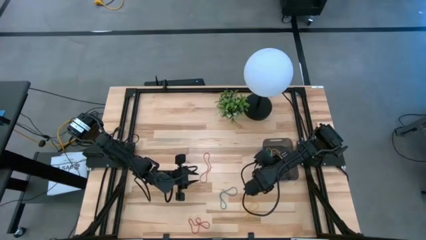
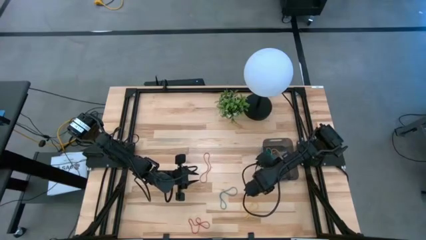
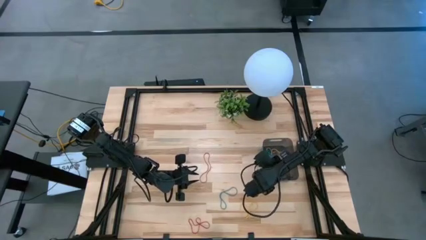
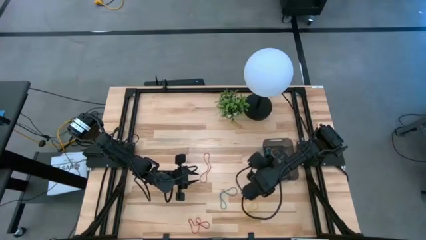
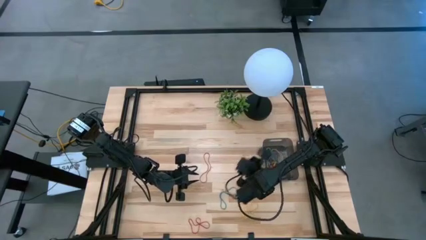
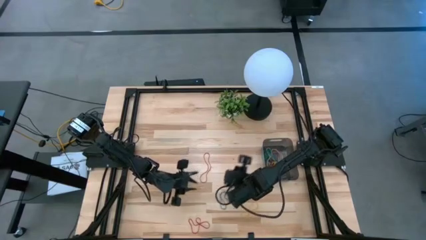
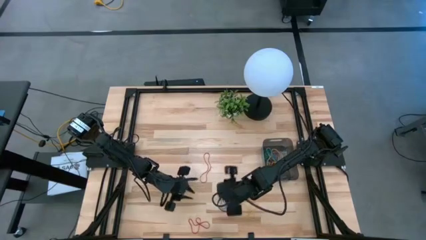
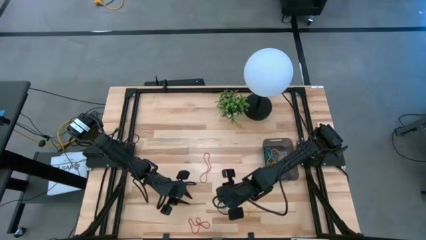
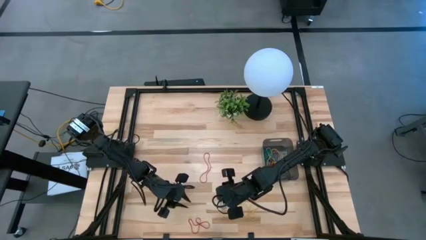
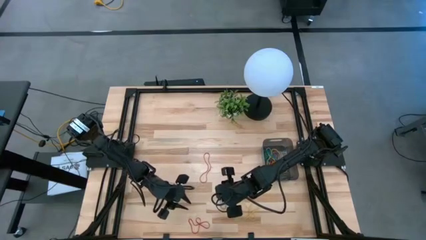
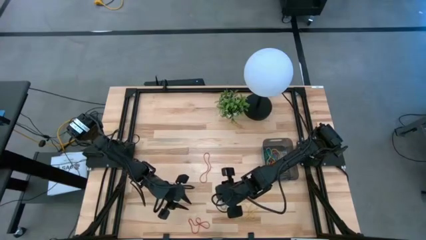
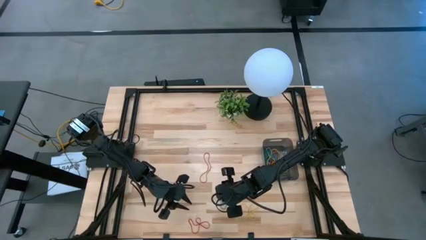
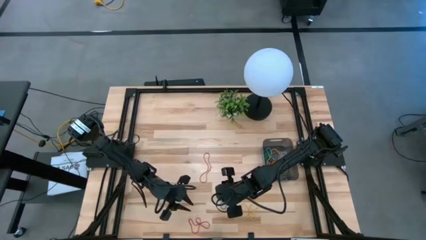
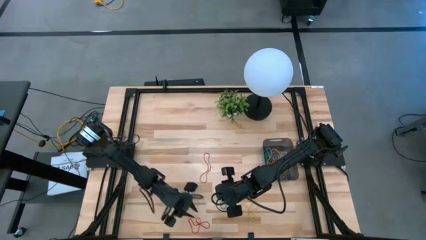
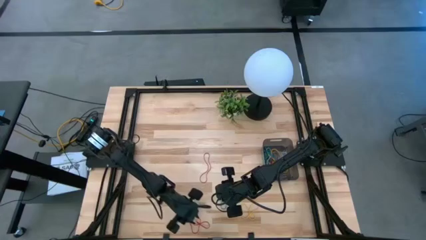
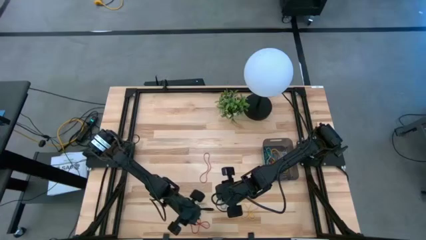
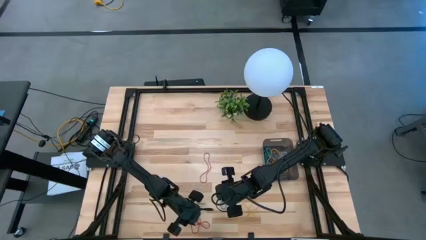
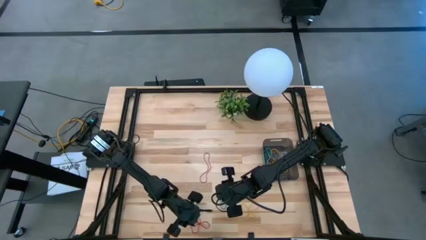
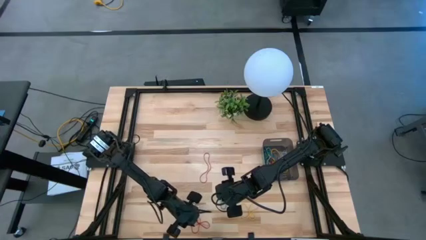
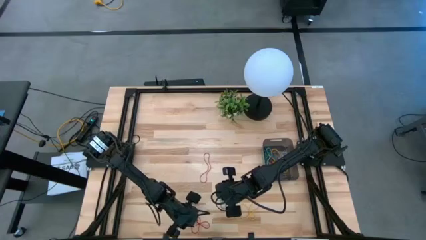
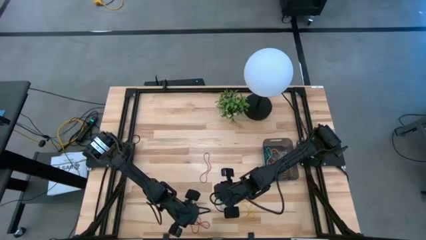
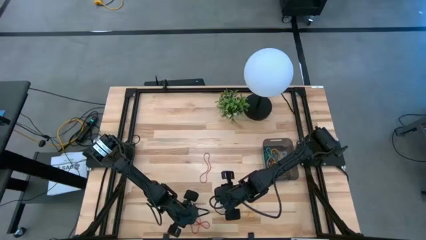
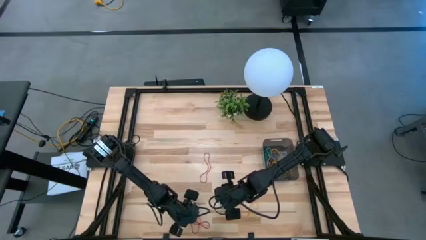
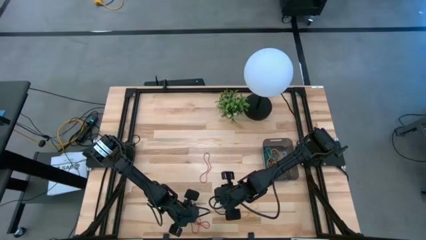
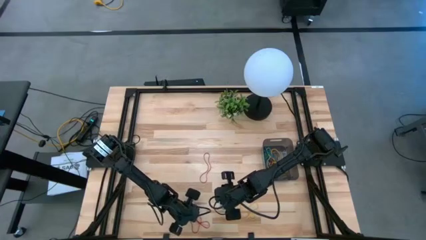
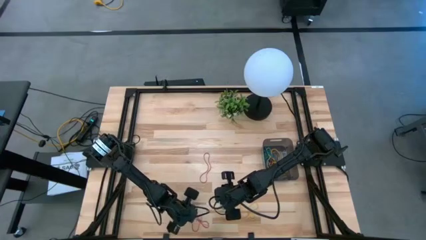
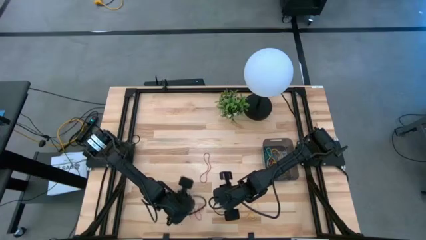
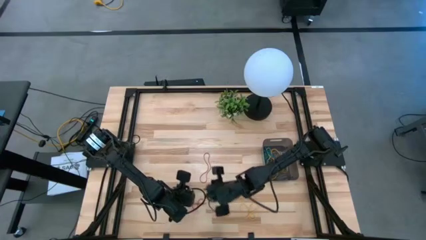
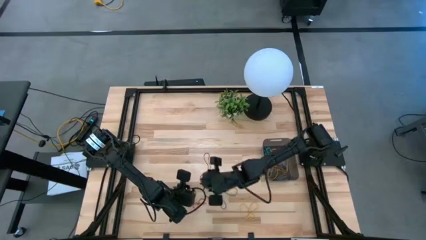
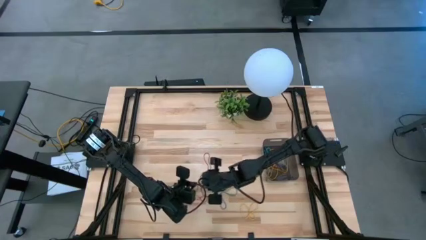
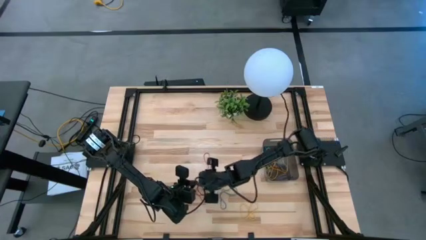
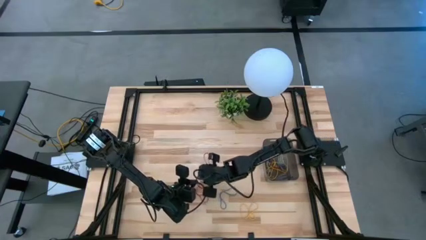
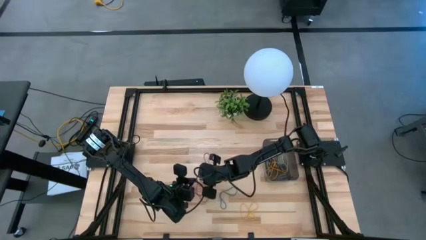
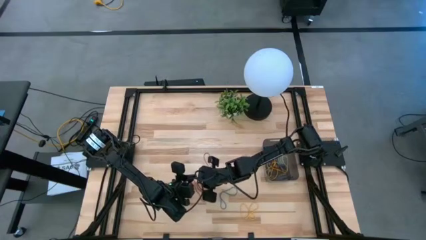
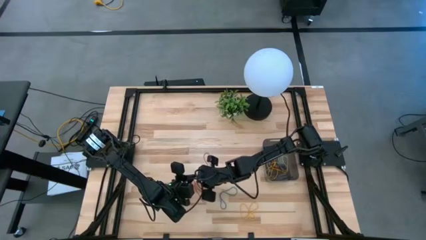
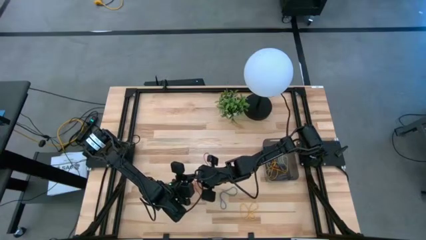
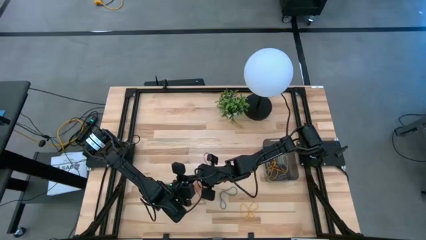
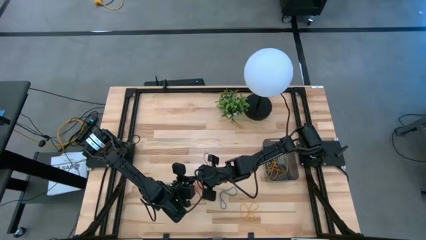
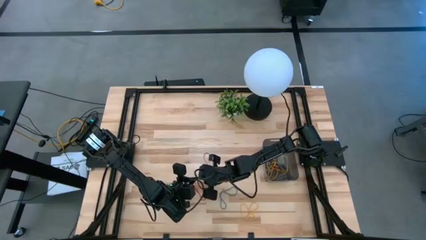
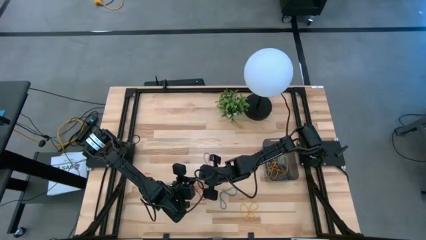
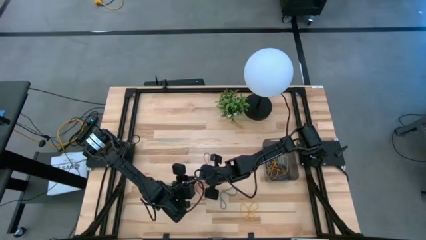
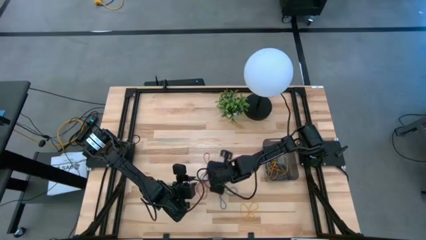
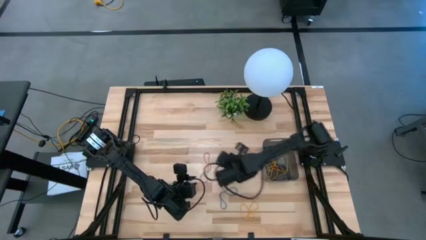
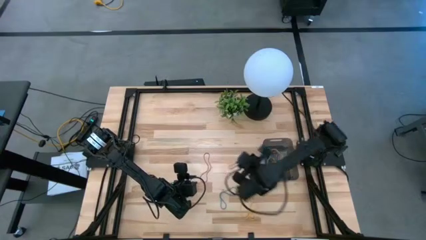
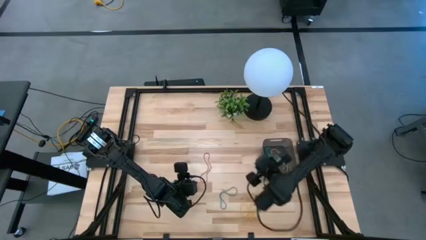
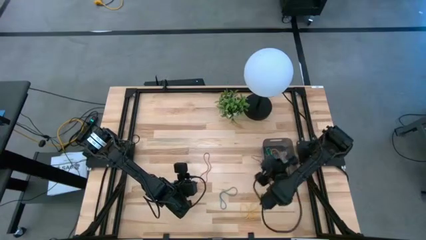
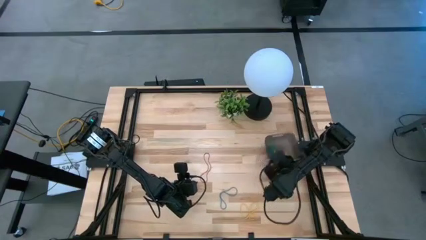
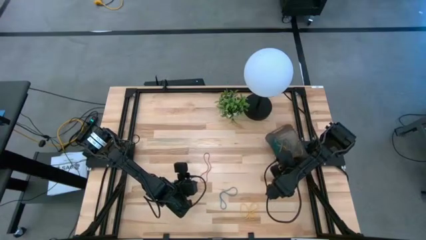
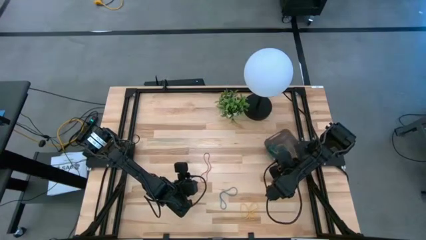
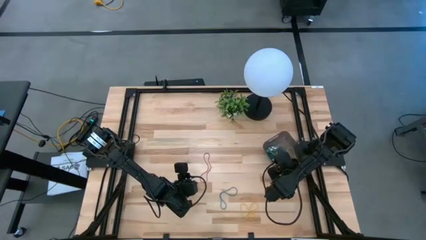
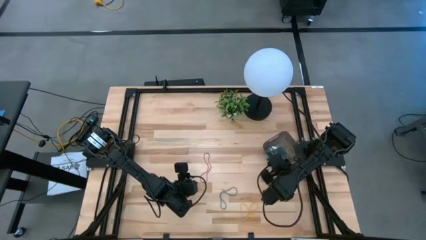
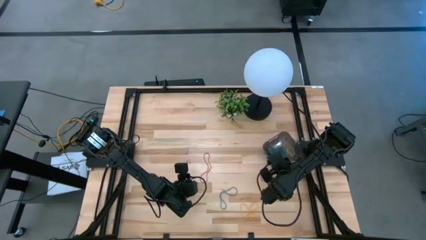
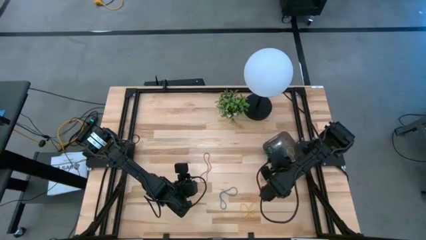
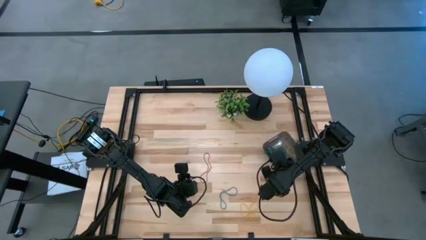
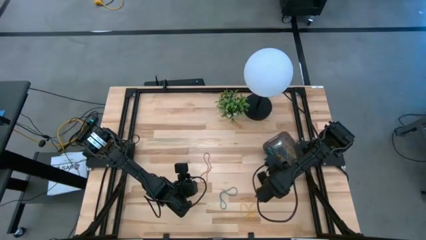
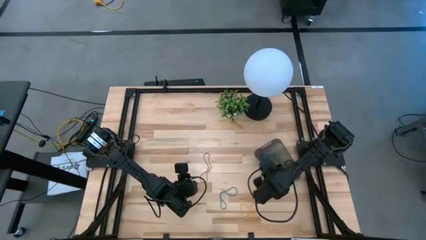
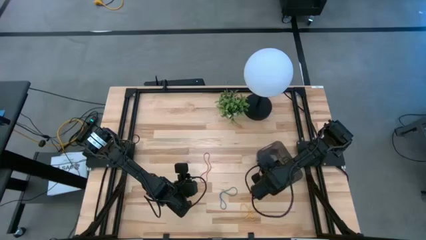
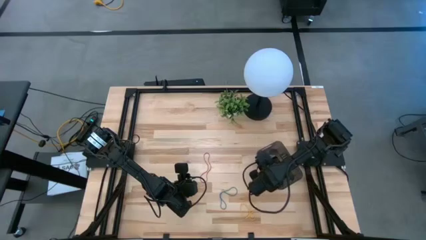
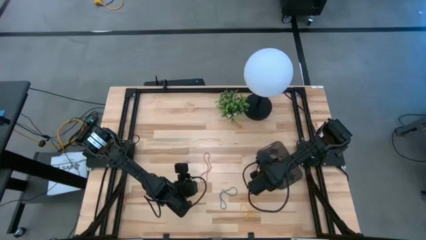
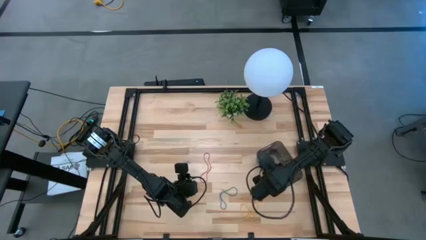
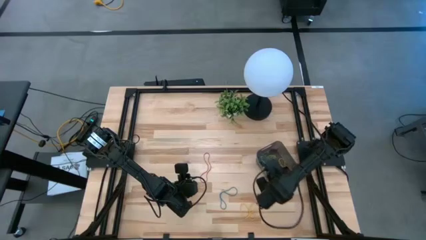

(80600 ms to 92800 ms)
Task: Pick and place items into bin
Put the bottom red rubber band into the black transparent bin
